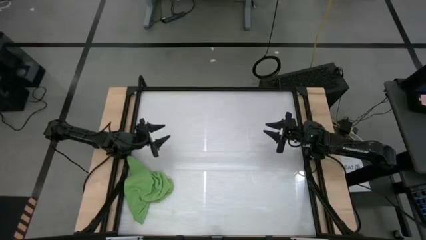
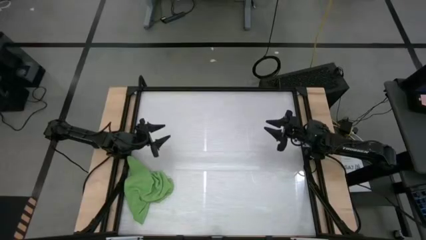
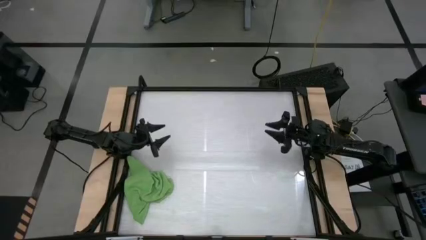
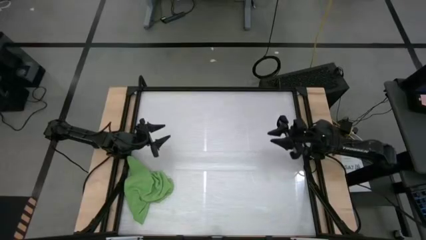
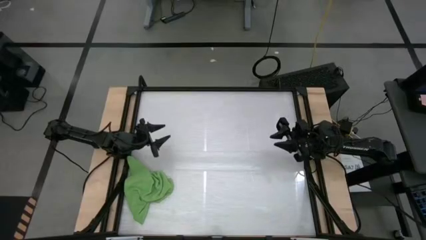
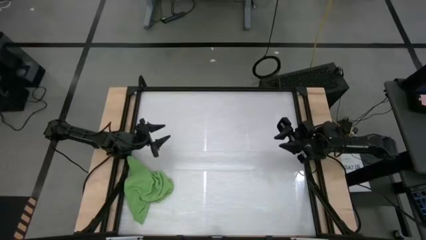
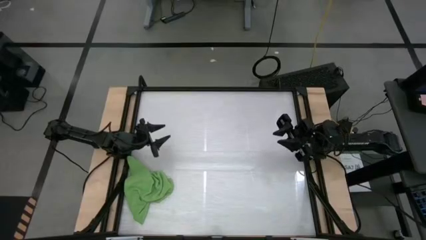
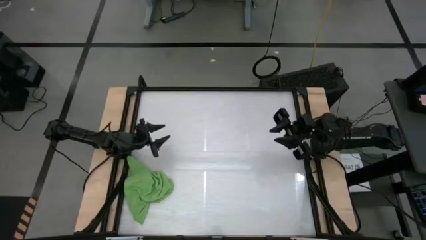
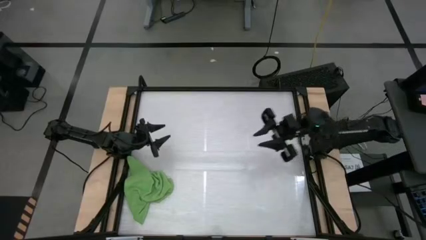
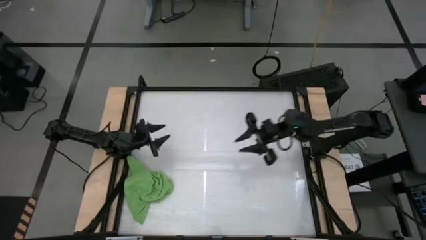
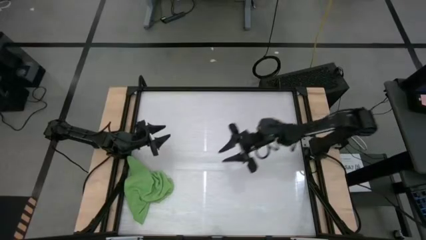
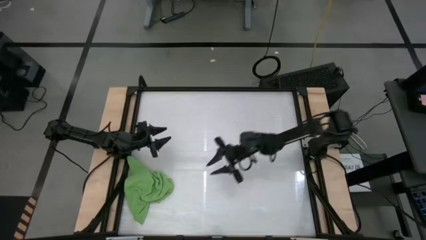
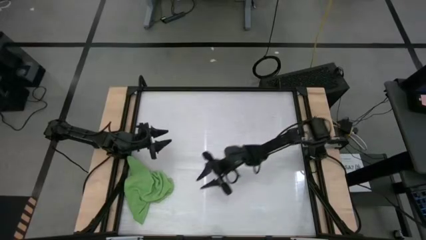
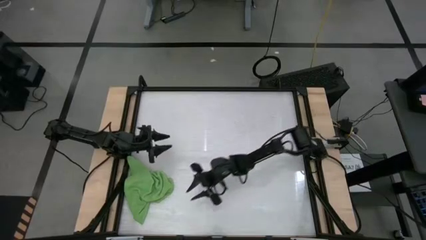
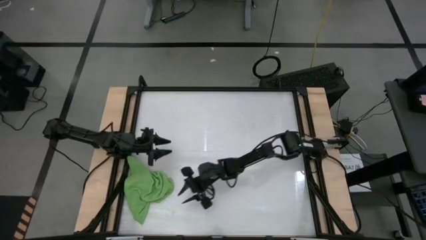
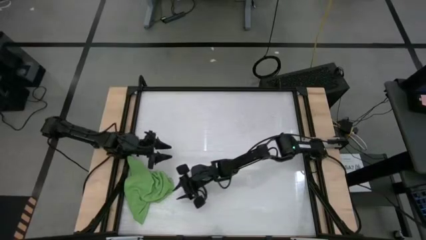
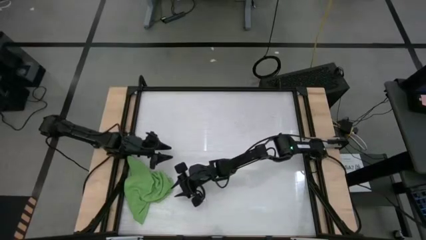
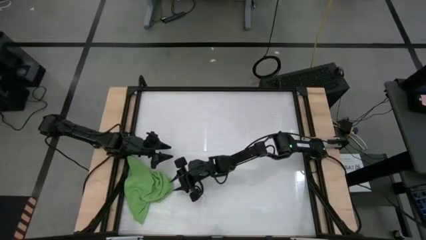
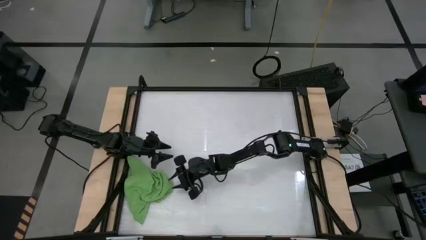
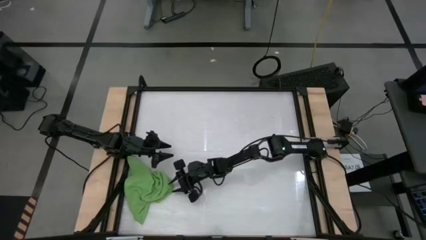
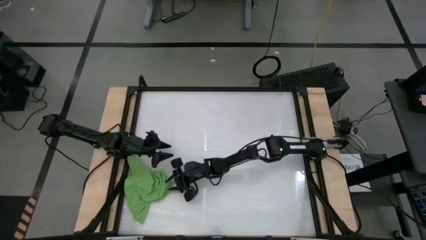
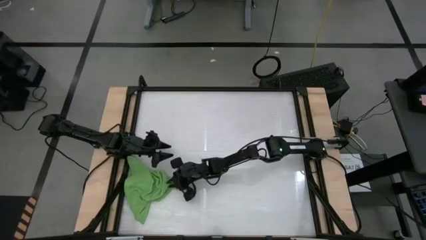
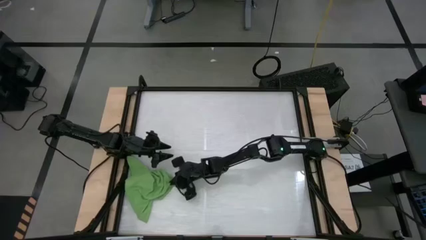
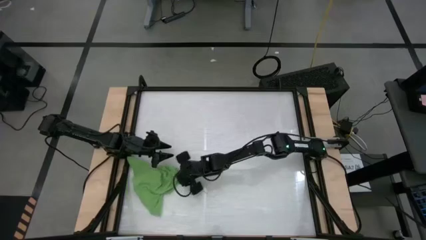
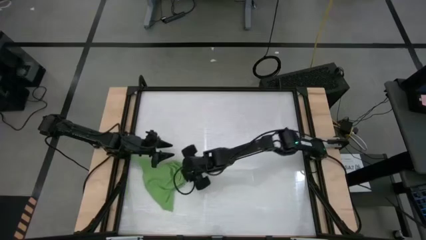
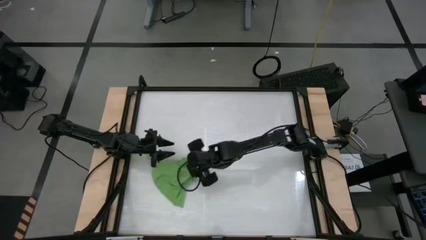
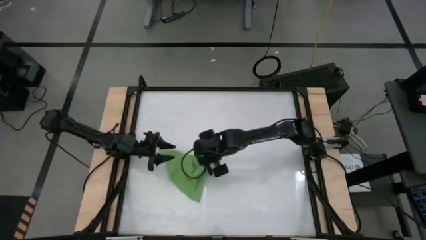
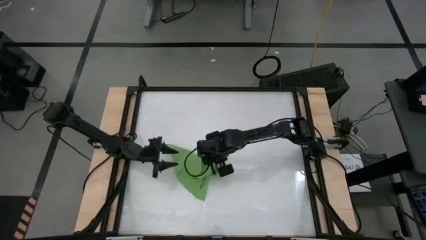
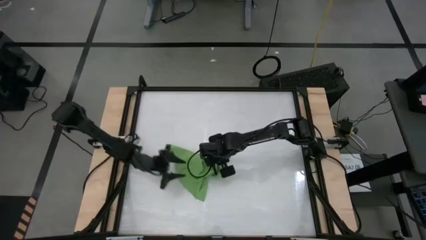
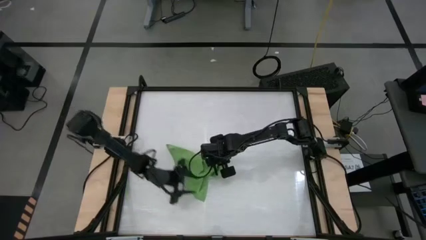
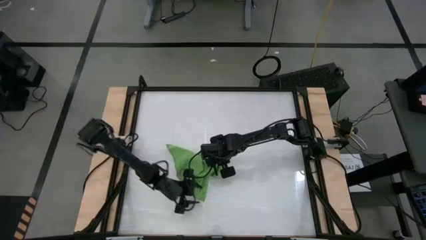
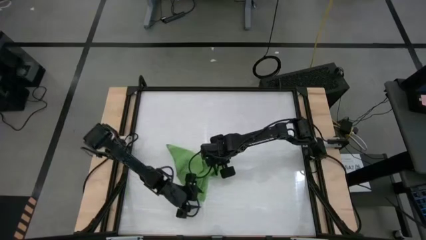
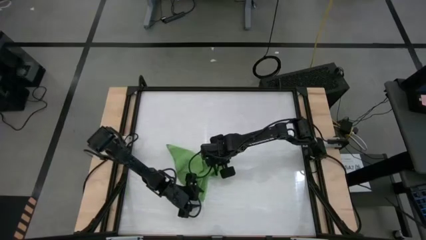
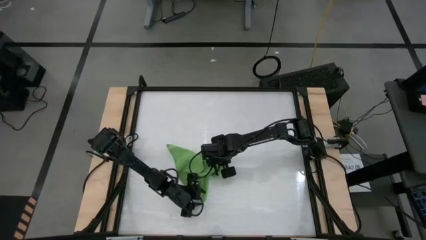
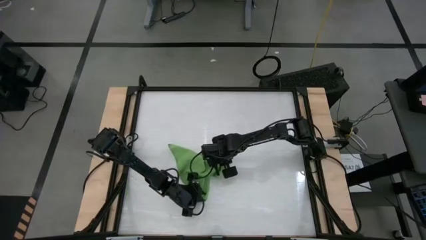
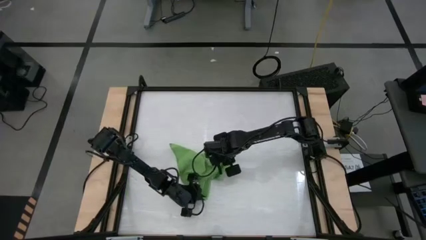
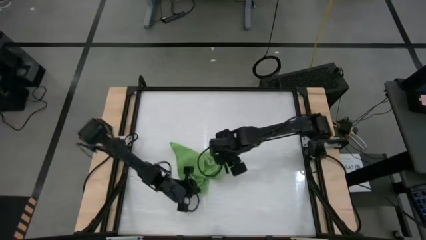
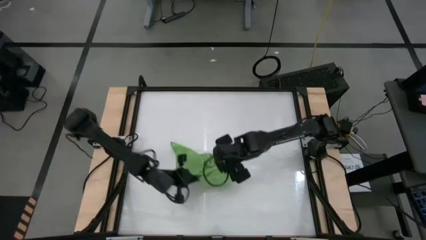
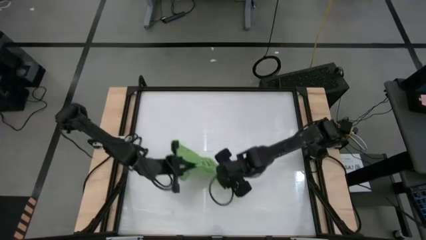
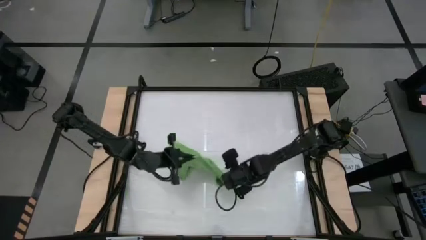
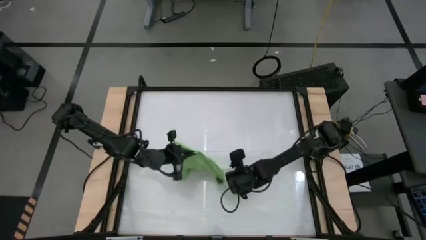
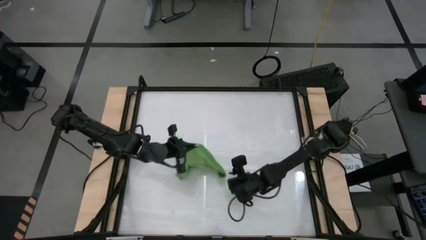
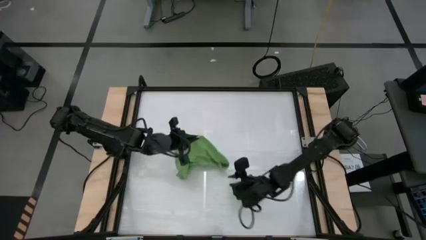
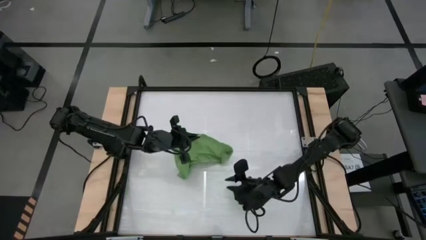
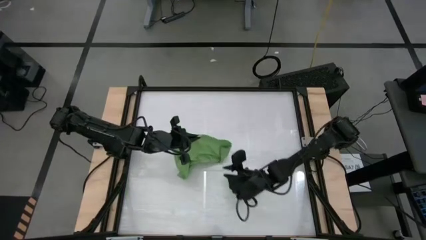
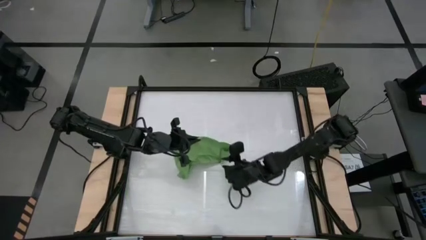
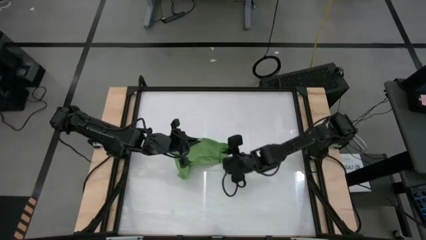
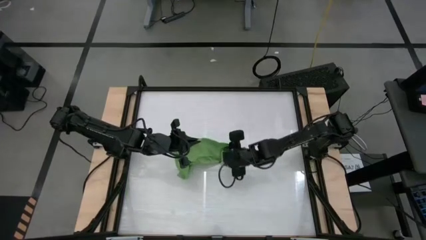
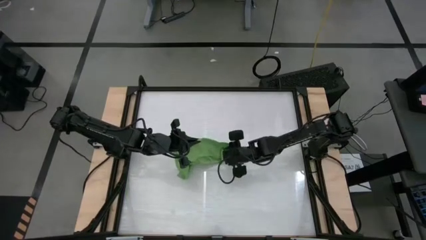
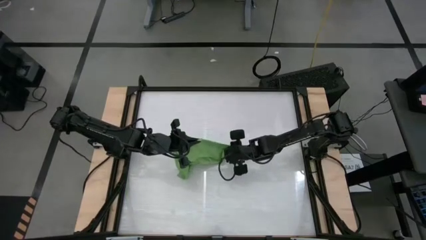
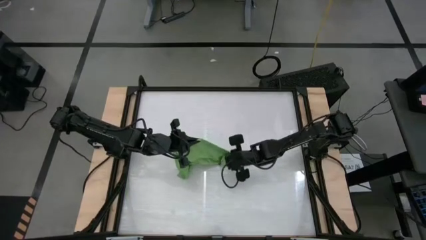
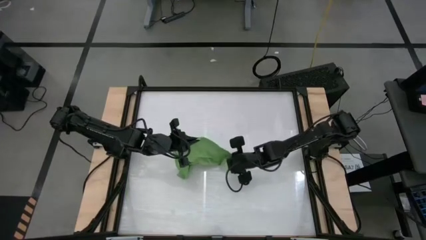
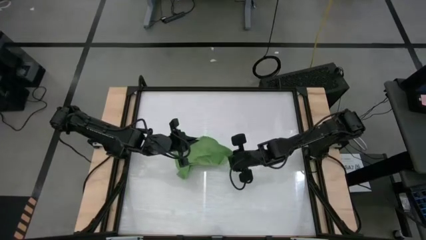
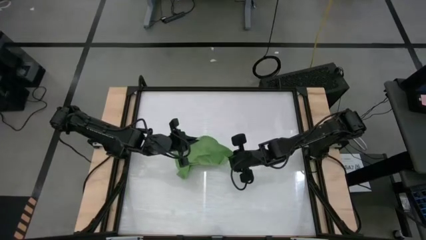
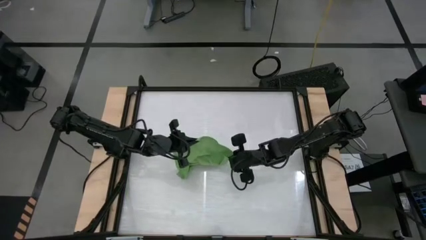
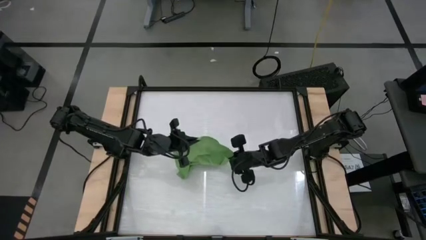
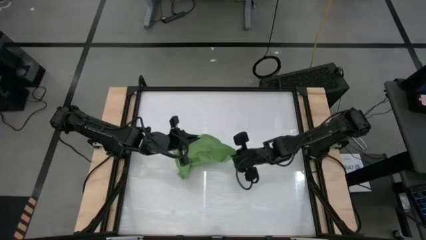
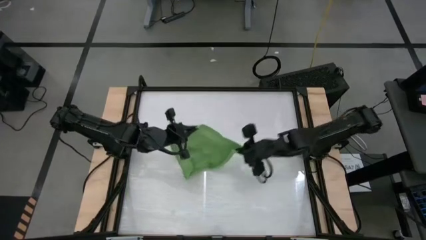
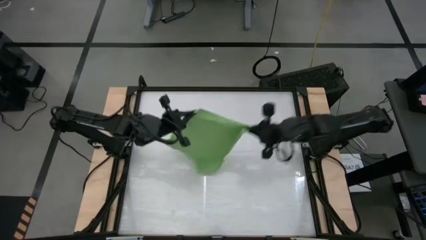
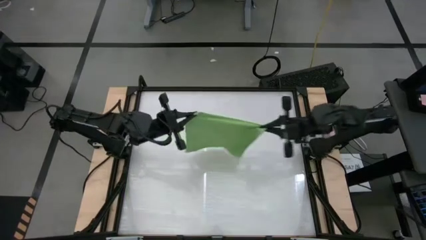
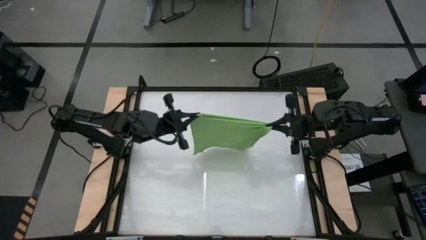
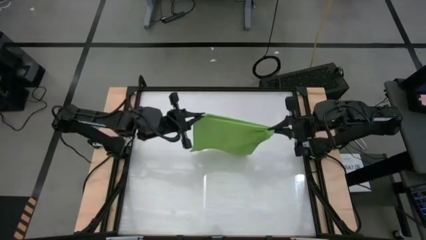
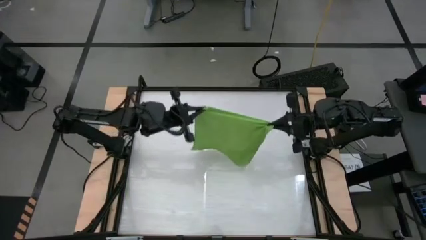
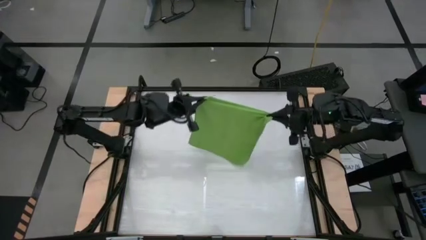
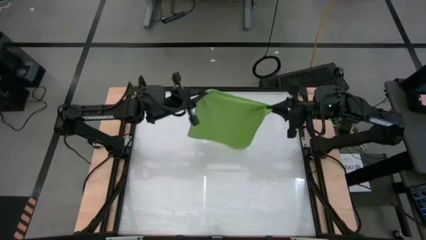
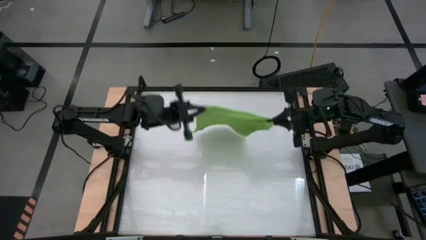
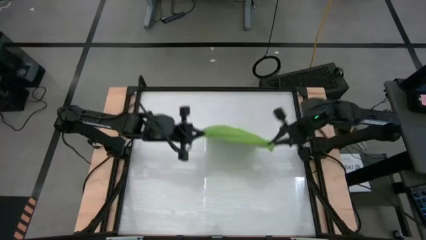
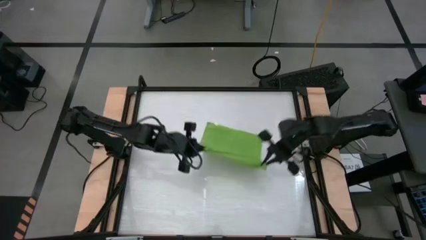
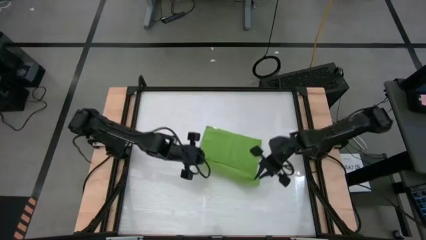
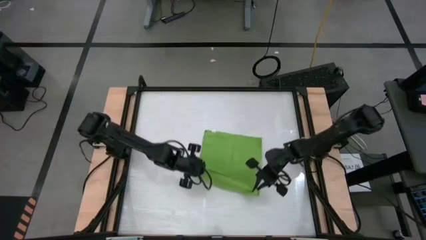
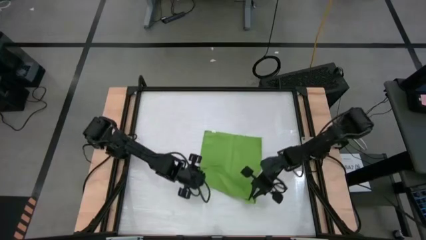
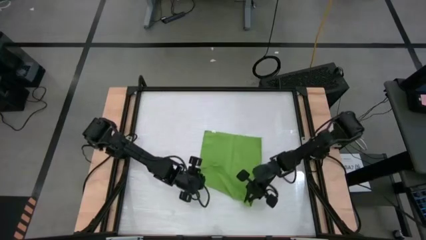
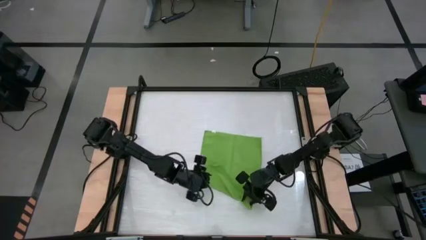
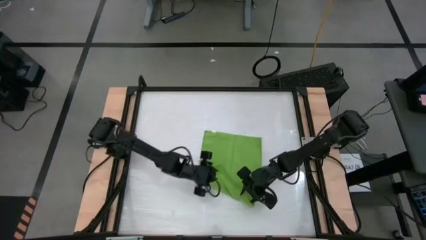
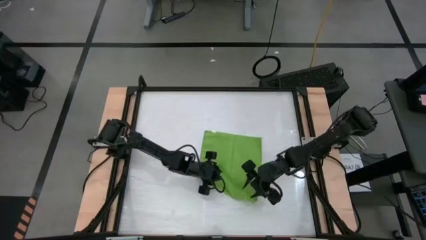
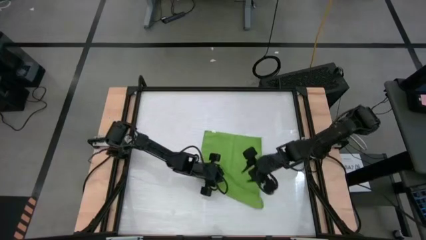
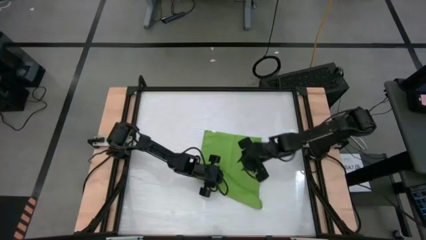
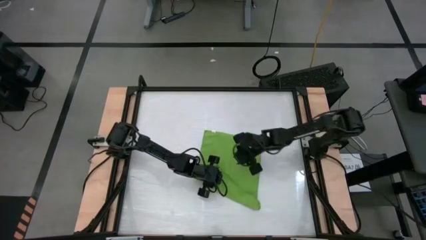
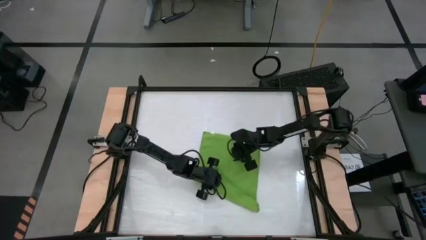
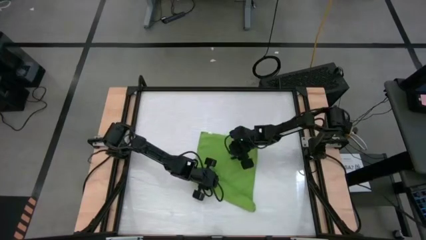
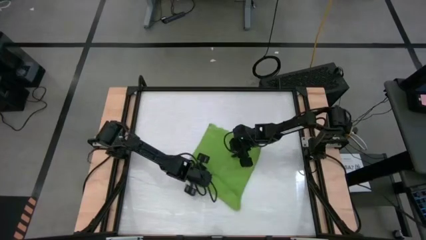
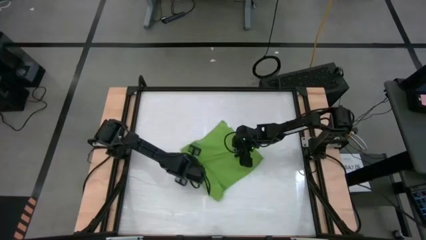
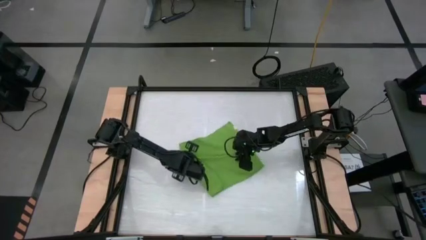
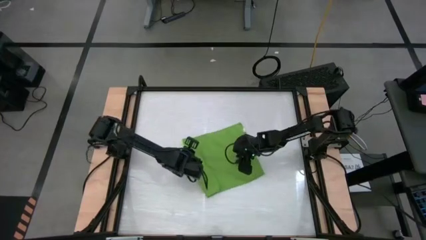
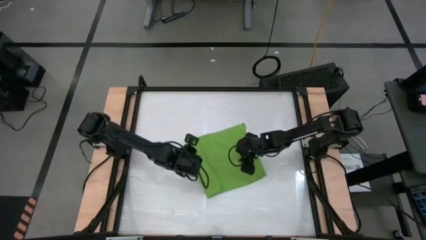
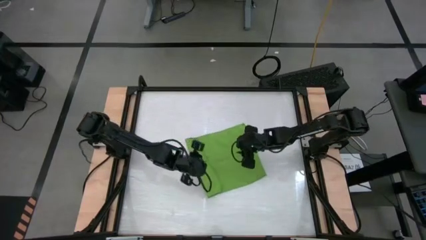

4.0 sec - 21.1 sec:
Task: Roll towel
Roll the green microfiber cloth
